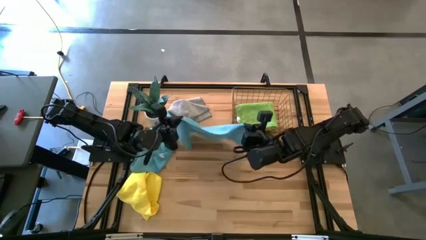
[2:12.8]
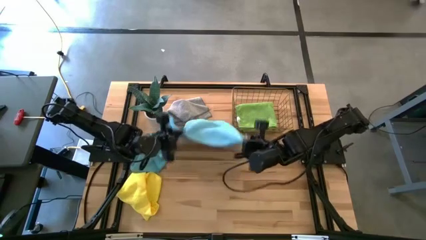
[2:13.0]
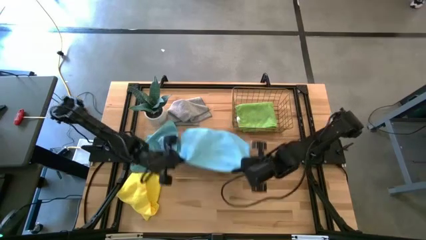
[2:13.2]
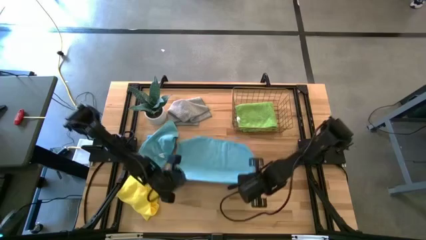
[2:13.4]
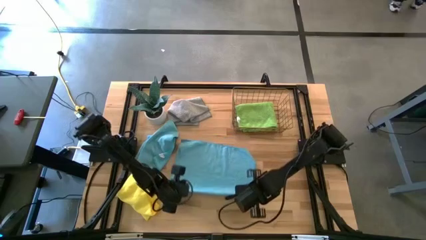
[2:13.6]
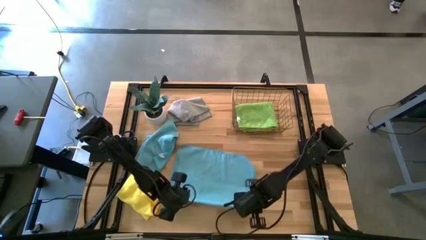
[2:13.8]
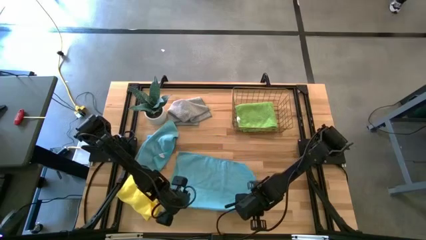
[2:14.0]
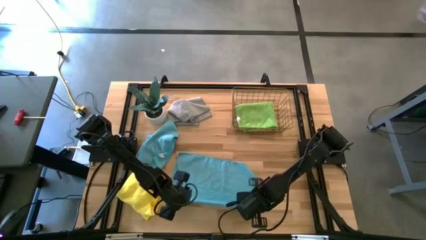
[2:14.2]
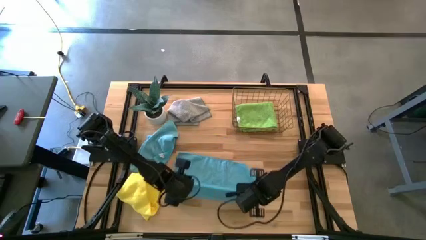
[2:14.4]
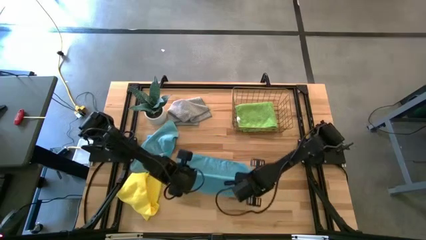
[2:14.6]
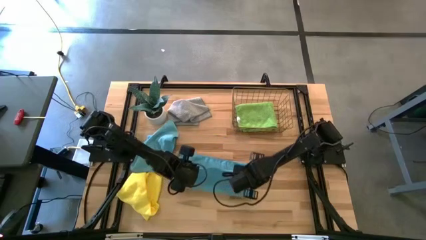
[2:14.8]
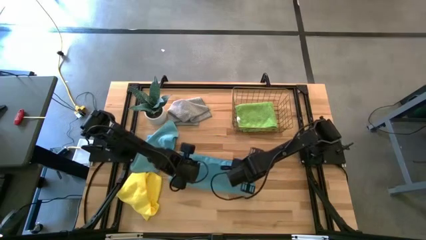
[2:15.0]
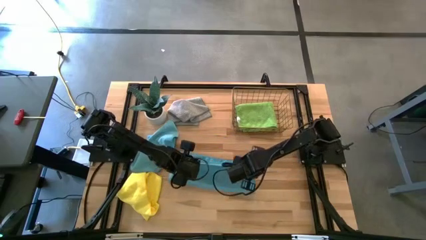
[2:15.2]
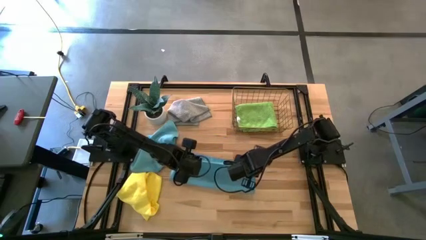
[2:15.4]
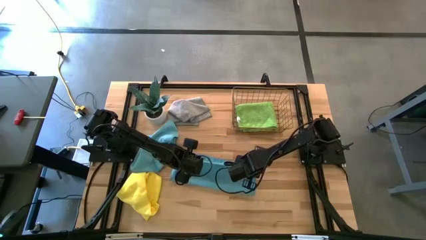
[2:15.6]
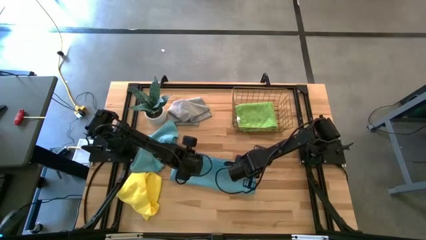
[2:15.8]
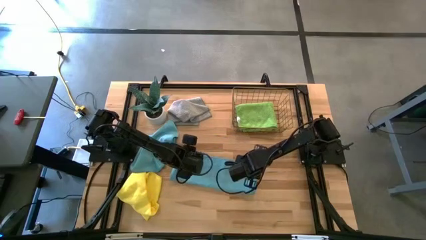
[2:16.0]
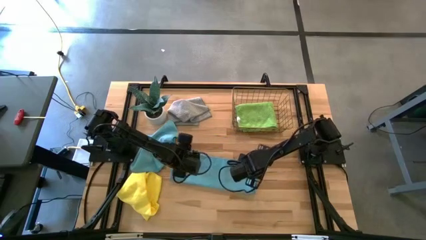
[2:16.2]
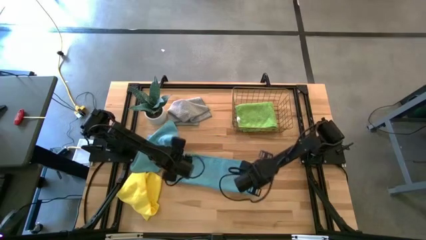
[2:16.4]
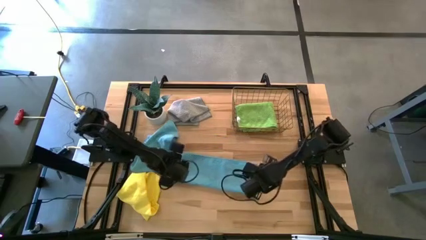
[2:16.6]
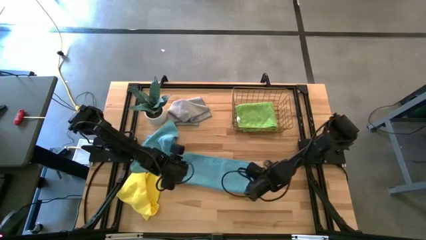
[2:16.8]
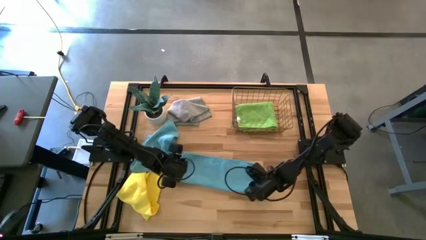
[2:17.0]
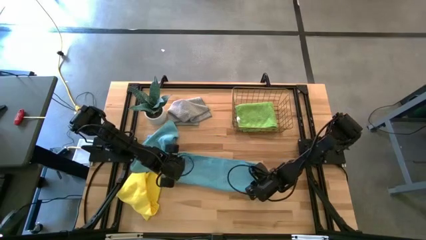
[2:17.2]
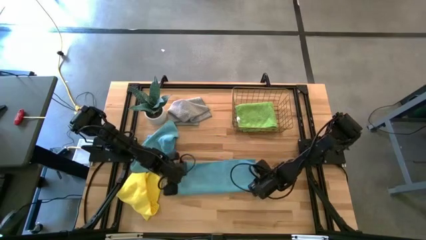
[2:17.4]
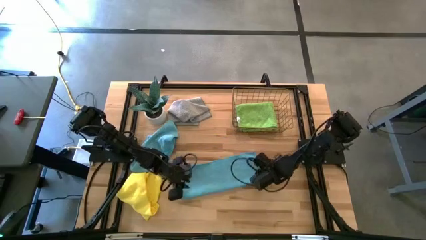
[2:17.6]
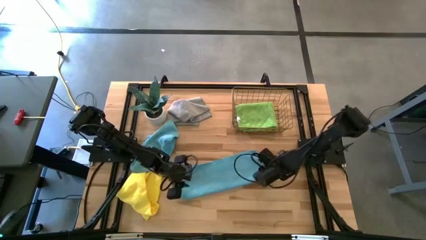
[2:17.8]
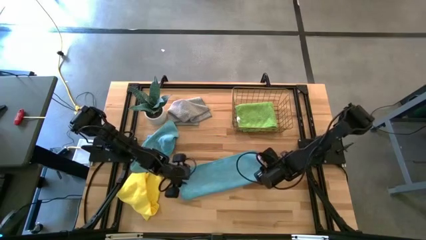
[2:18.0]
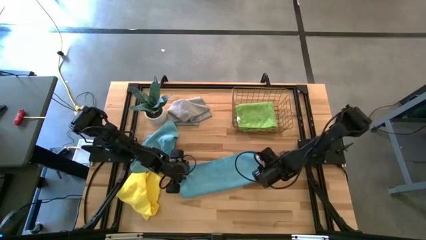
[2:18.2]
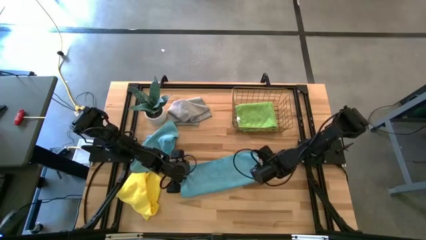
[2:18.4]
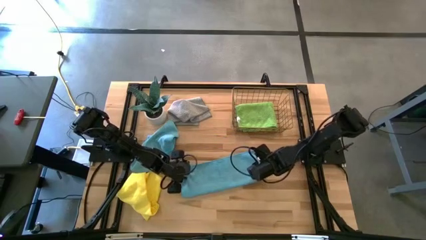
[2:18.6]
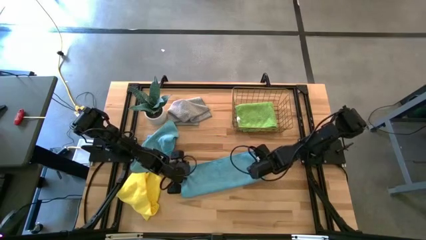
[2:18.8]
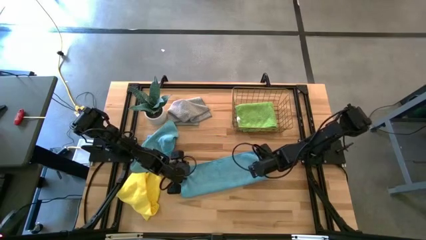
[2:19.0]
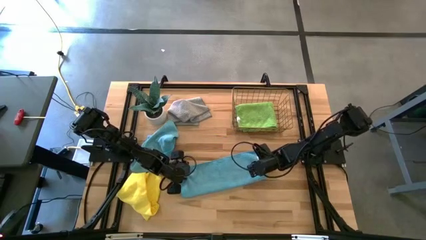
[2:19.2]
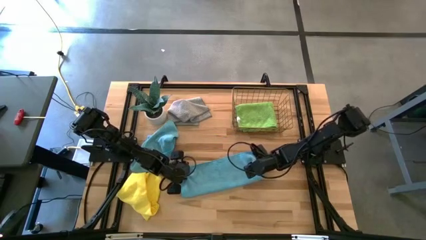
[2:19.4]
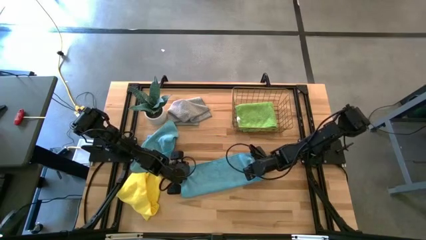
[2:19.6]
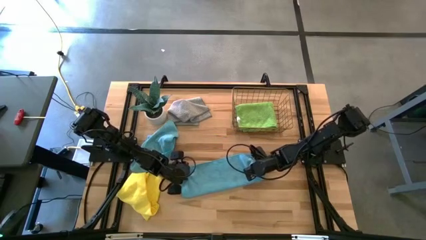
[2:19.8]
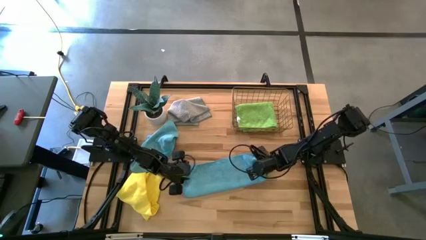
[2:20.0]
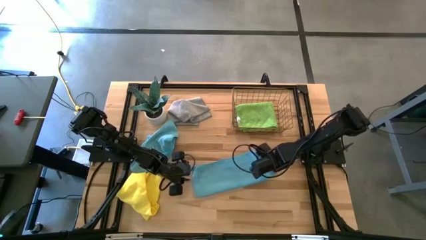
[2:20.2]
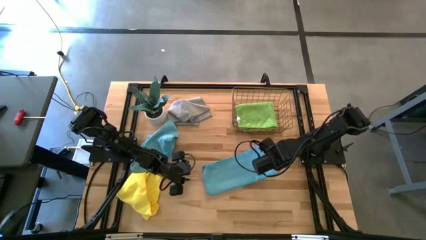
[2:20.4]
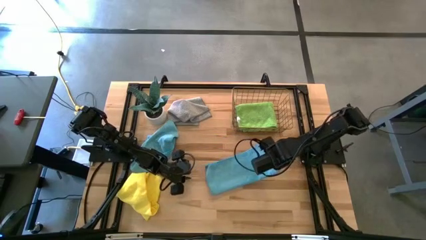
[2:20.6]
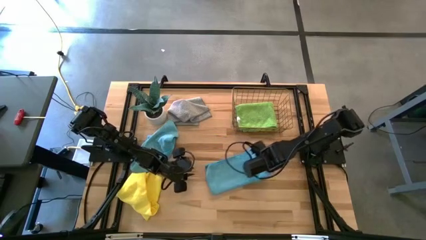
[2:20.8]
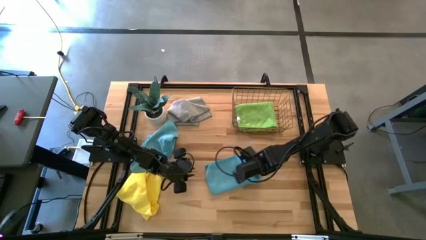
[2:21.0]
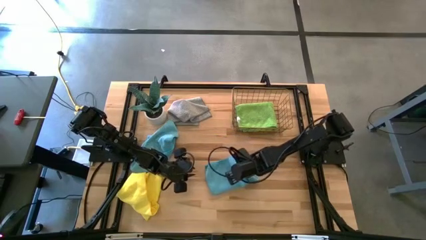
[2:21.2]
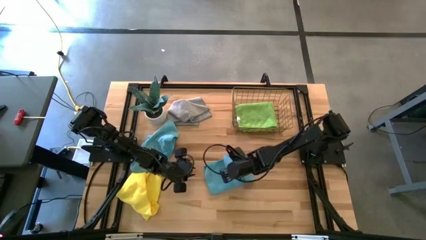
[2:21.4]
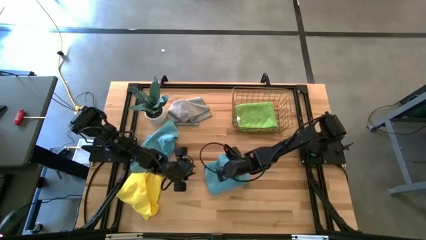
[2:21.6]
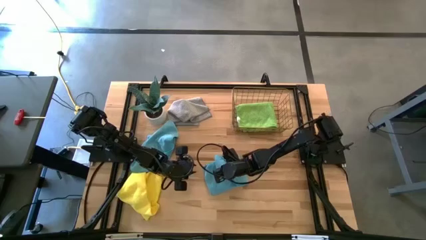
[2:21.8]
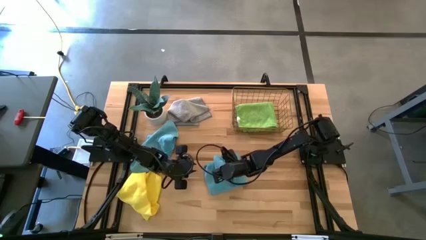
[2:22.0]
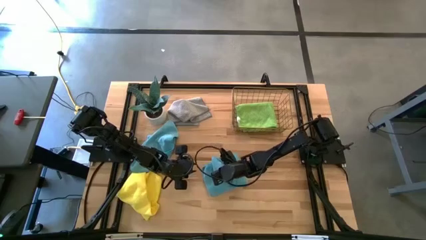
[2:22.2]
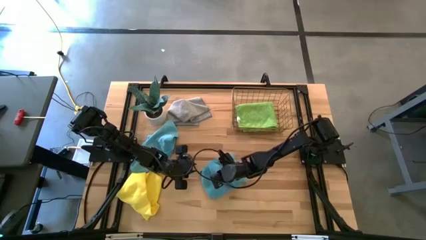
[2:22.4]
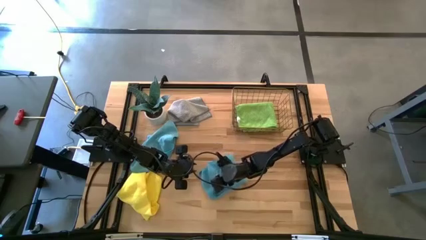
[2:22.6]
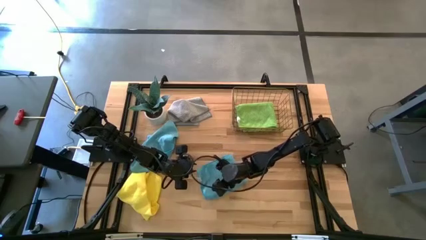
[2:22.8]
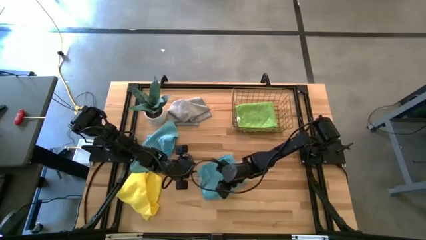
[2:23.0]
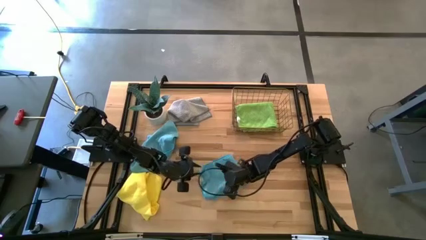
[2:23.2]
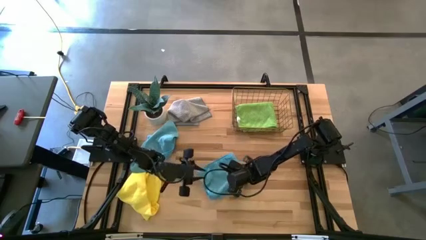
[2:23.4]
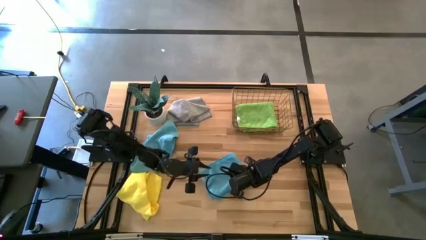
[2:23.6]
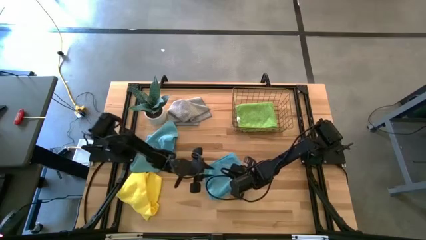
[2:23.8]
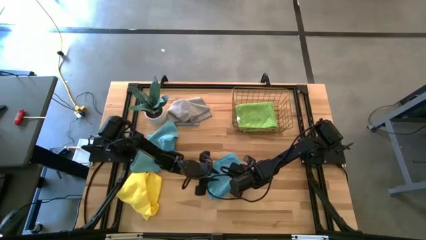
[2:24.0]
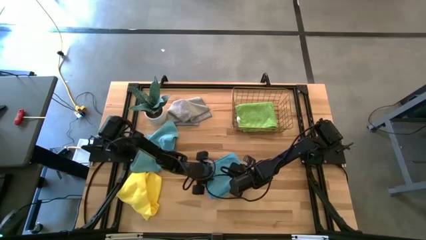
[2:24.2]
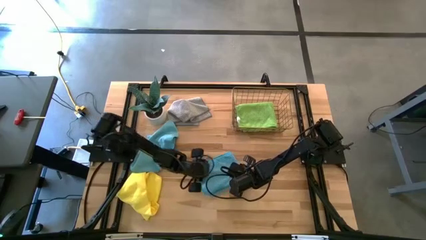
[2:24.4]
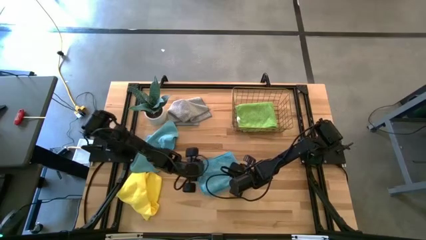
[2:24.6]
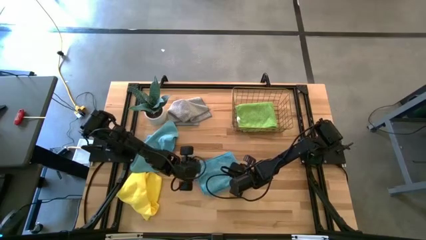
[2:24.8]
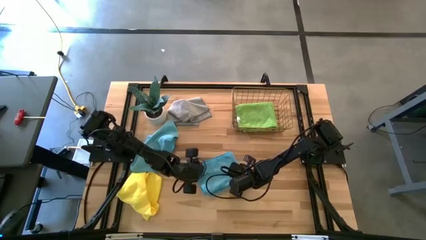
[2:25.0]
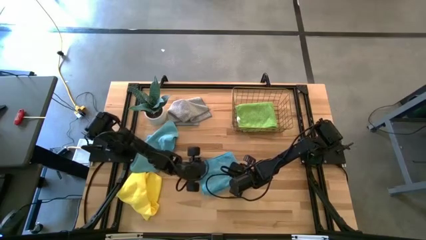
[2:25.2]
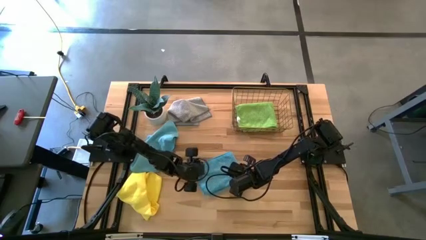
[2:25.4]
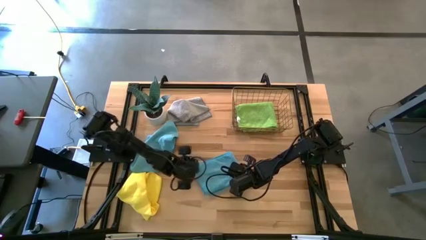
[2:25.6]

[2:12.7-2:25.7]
Task: Fold microfiber towels
Fold the bottom blue microfiber towel
